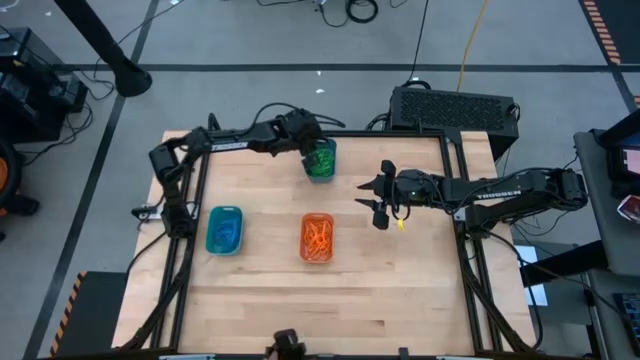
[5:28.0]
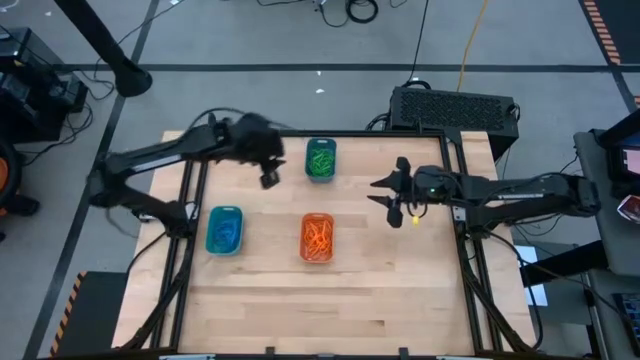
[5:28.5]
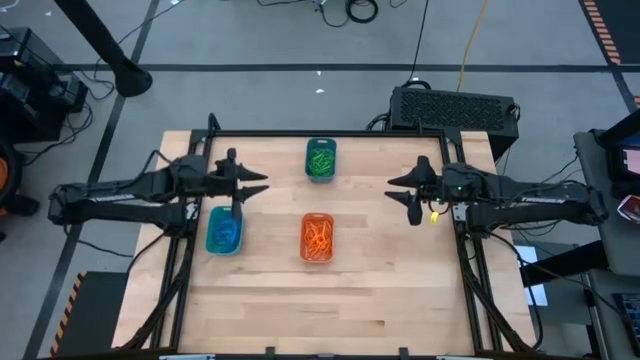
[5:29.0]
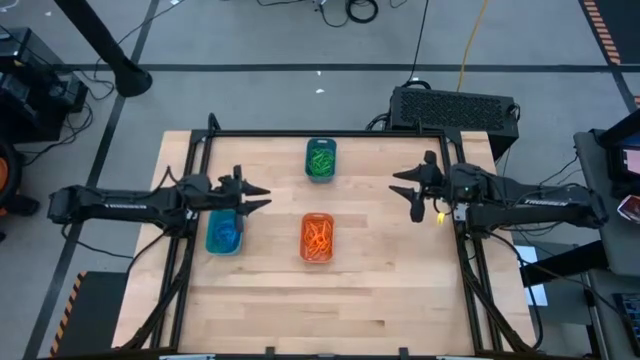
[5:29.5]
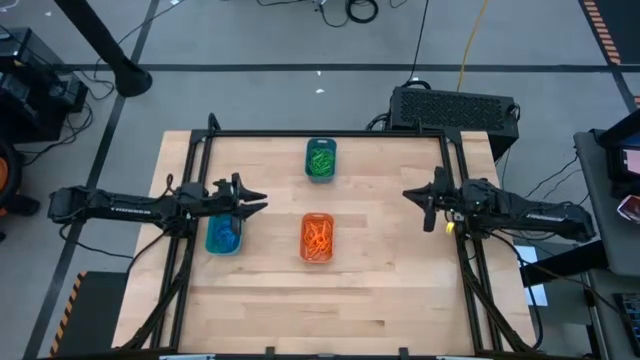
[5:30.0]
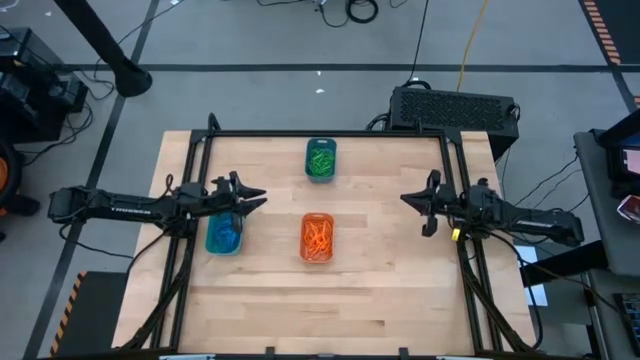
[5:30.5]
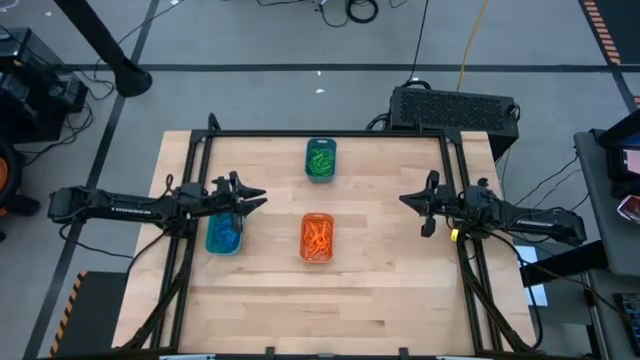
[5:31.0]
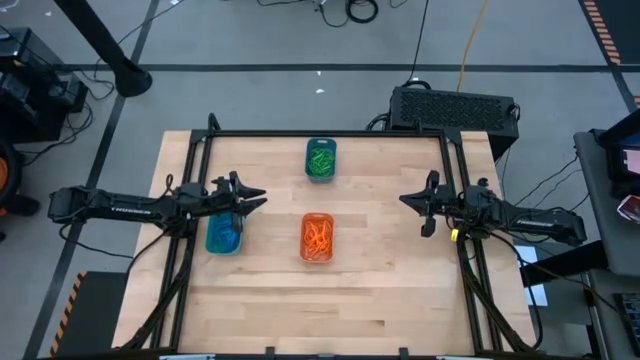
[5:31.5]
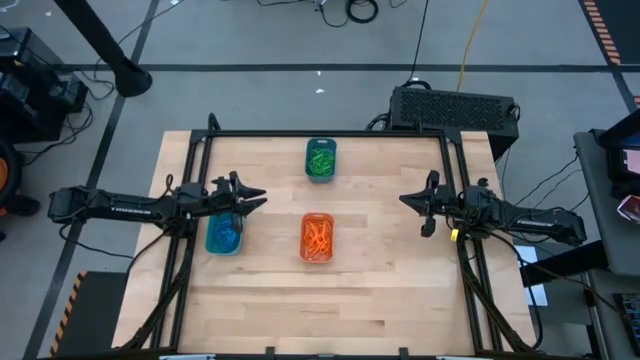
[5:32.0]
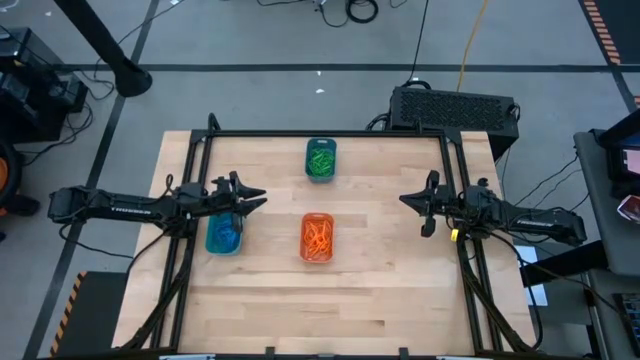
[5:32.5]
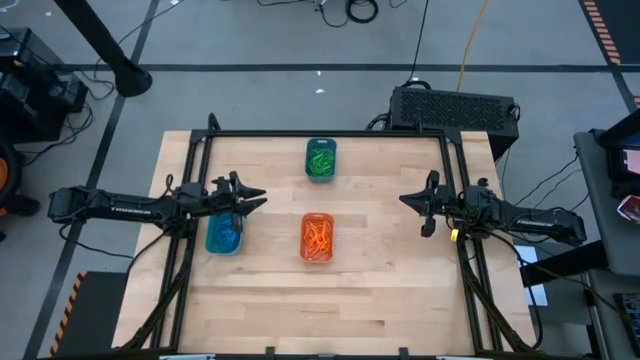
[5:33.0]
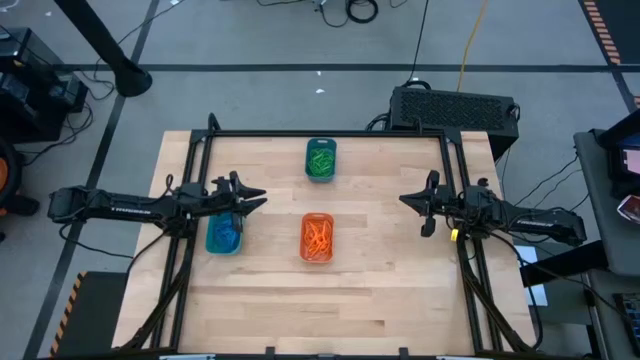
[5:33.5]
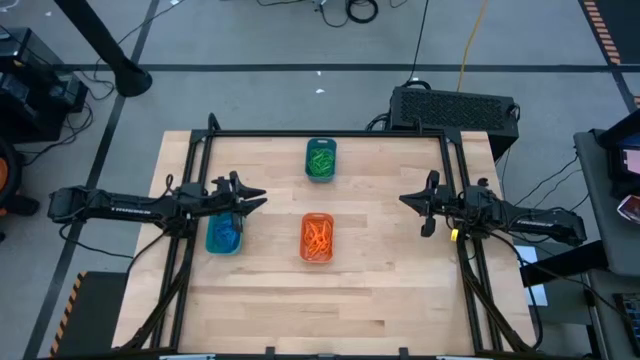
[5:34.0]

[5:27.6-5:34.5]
Task: Sort rubber bands into baskets
Return to Home Position

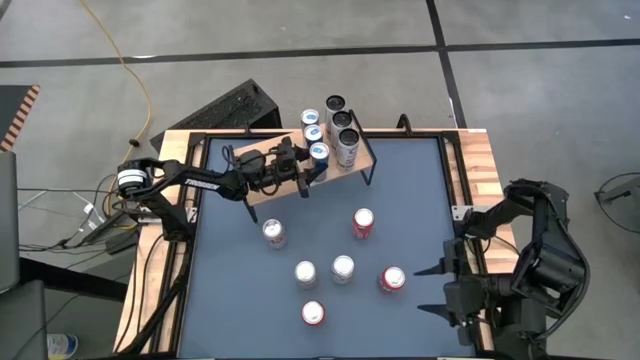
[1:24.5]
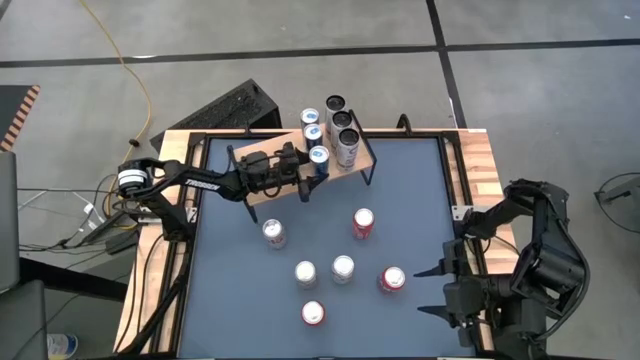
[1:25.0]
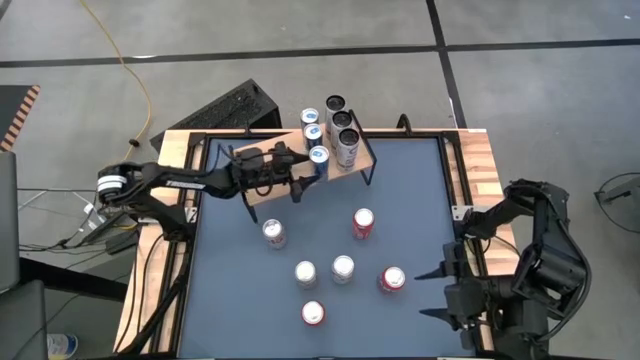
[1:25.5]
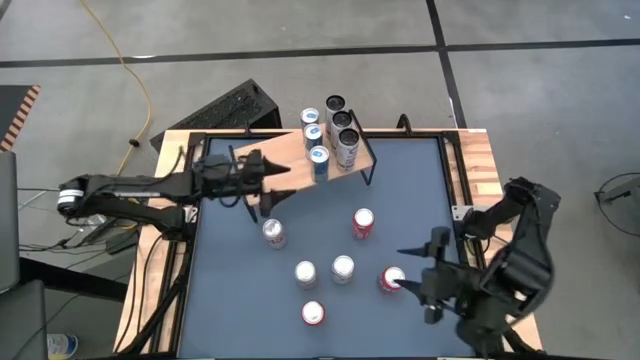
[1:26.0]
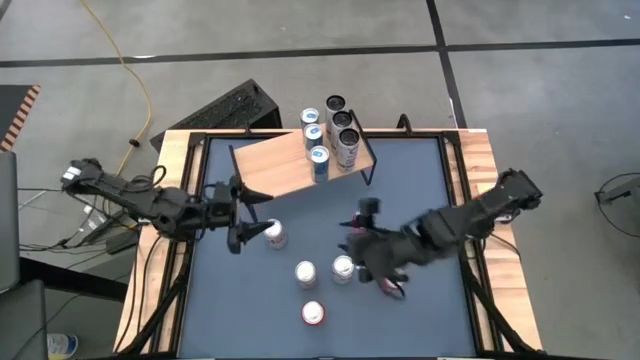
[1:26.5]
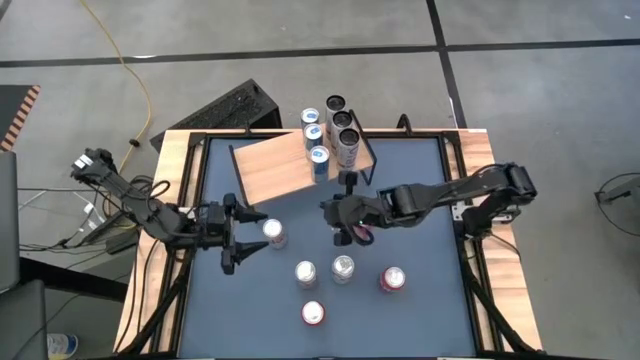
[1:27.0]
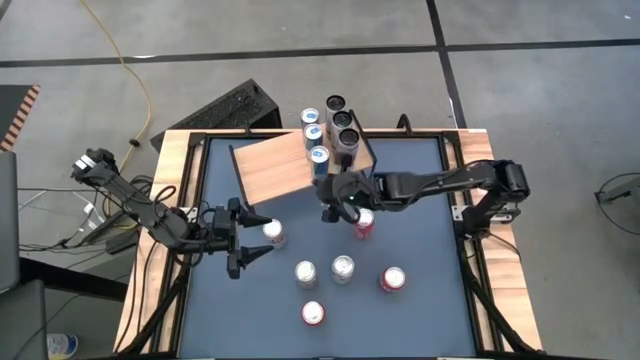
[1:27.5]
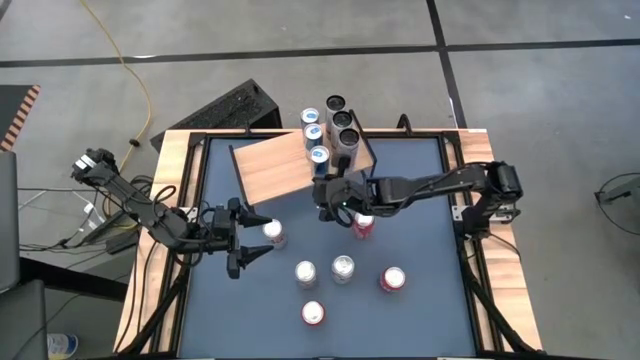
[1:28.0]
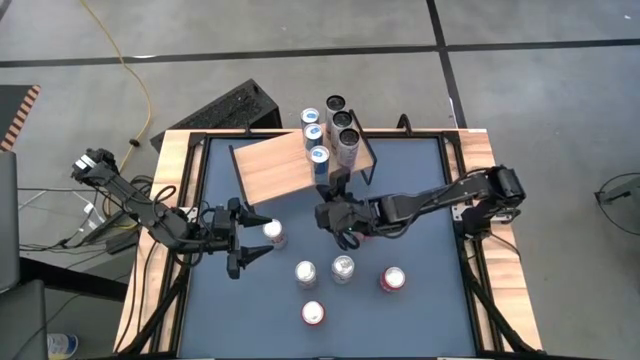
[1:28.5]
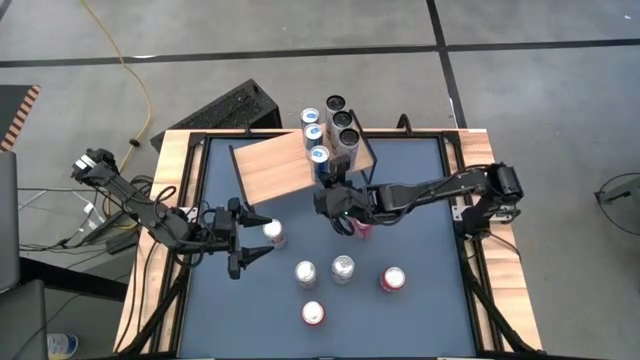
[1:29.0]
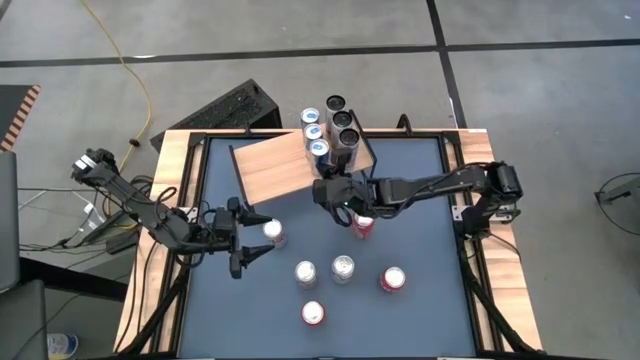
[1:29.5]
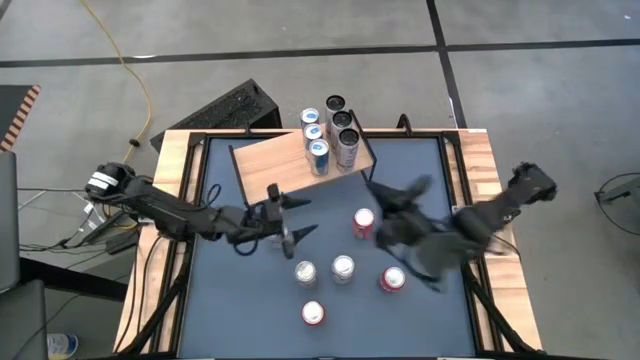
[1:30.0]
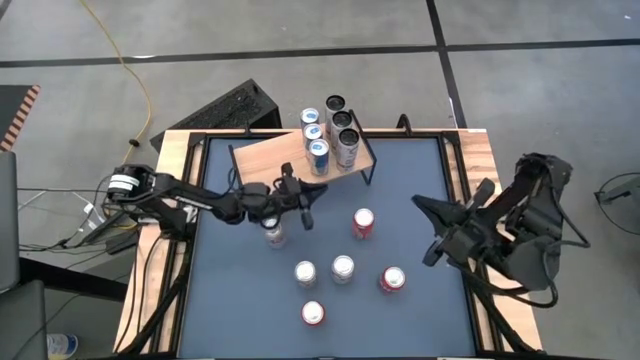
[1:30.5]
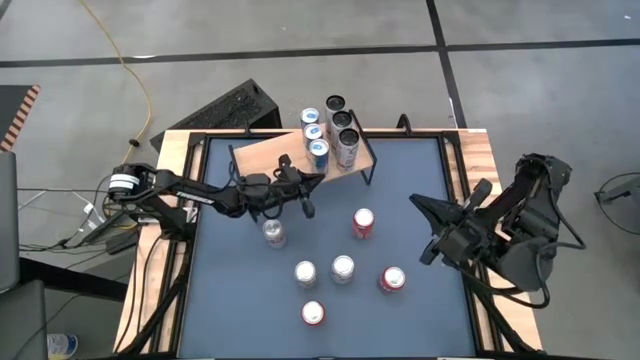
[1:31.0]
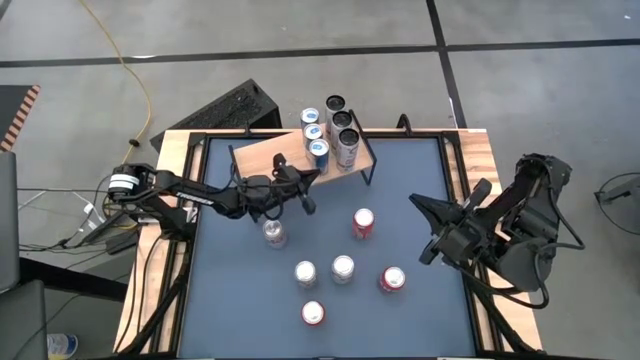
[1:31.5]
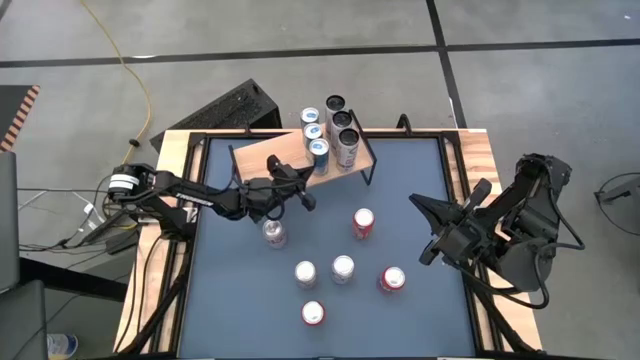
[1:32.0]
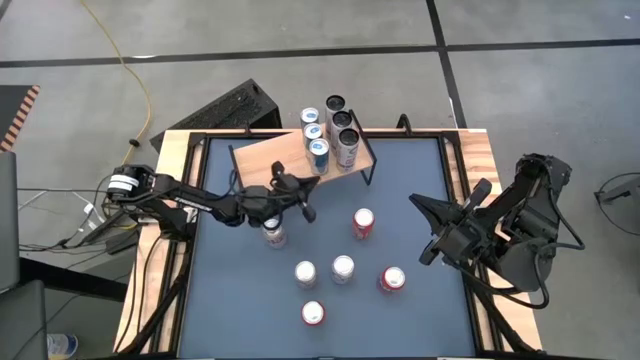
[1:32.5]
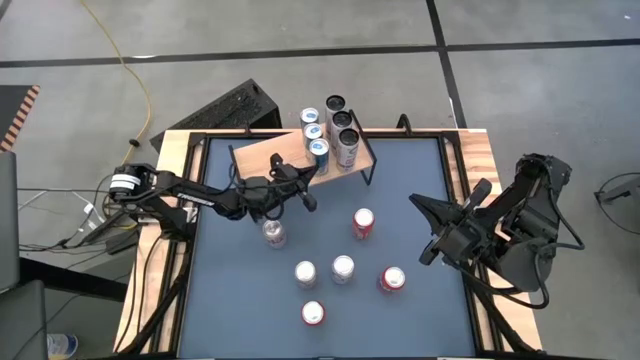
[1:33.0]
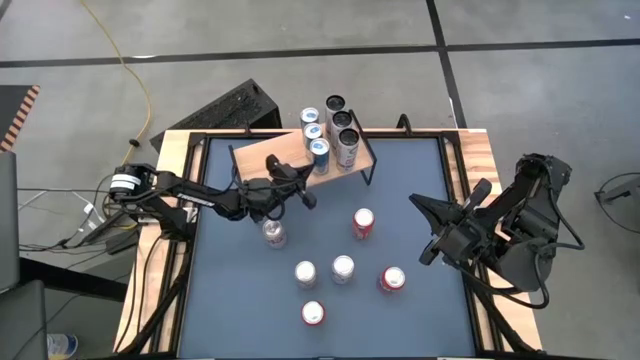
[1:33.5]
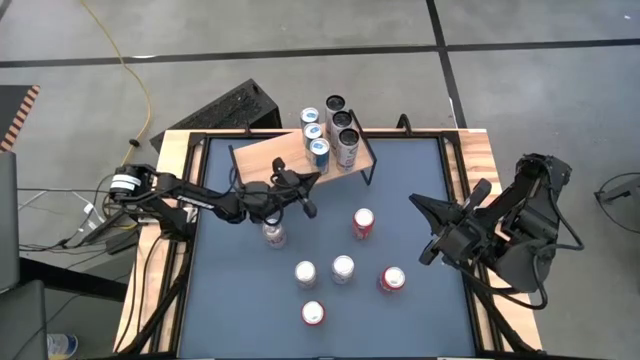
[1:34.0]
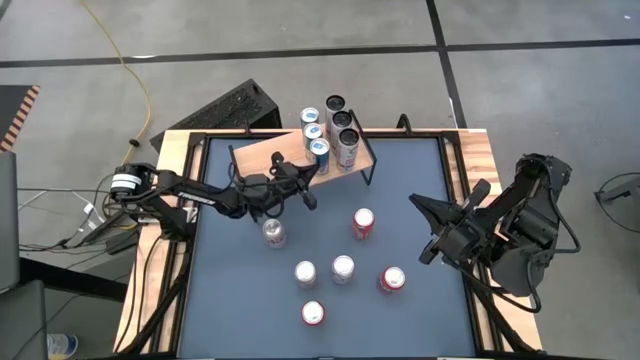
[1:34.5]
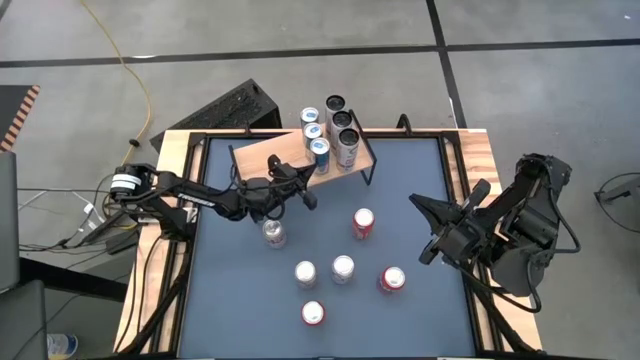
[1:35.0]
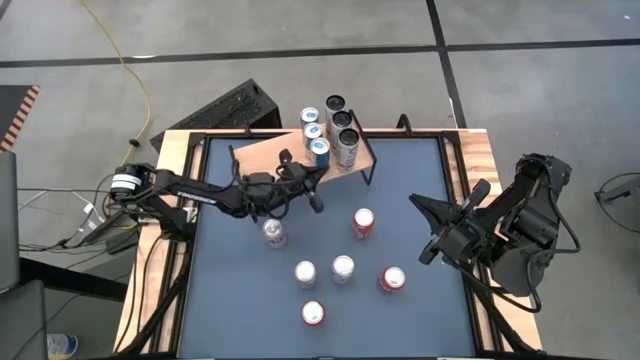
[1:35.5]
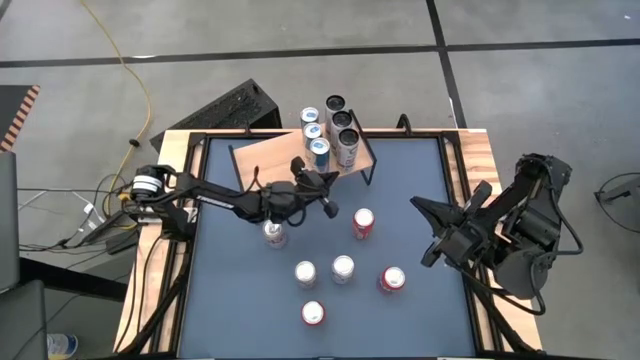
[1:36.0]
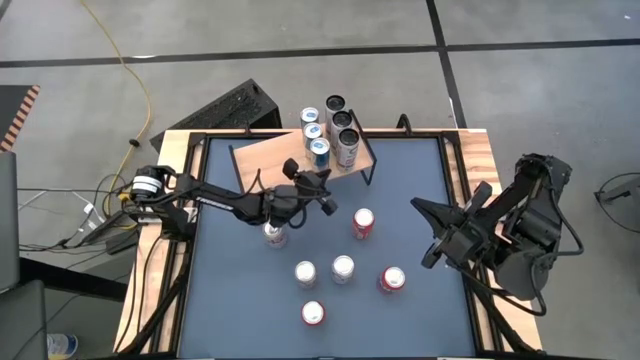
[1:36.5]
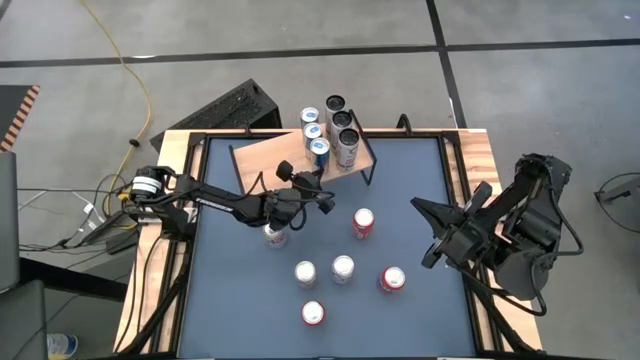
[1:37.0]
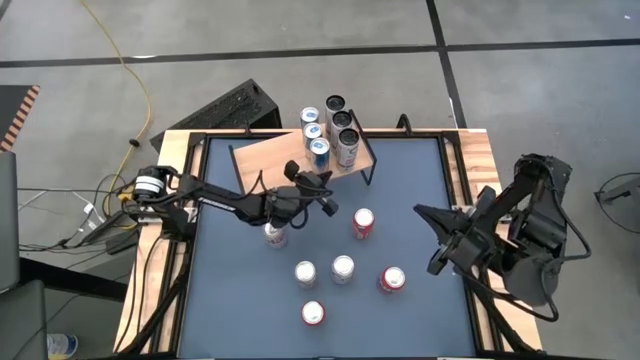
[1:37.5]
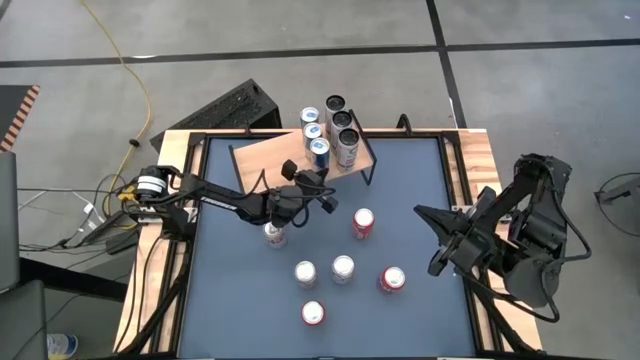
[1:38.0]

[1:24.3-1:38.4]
Task: Place canned beverage on shelf
Put the blue soda can on the shelf aligned with the other blue soda cans

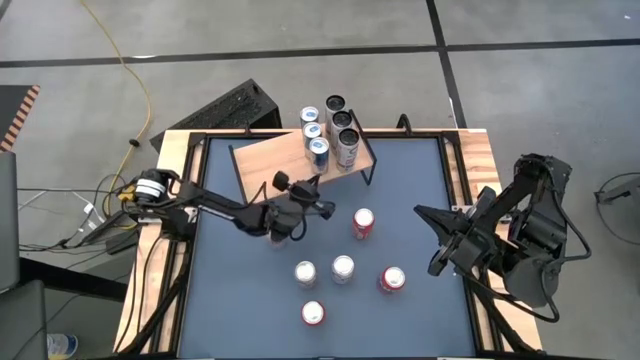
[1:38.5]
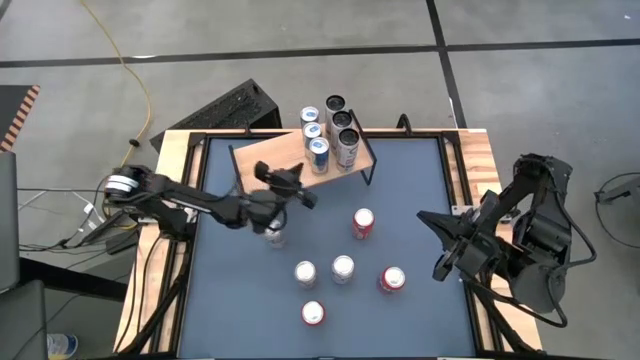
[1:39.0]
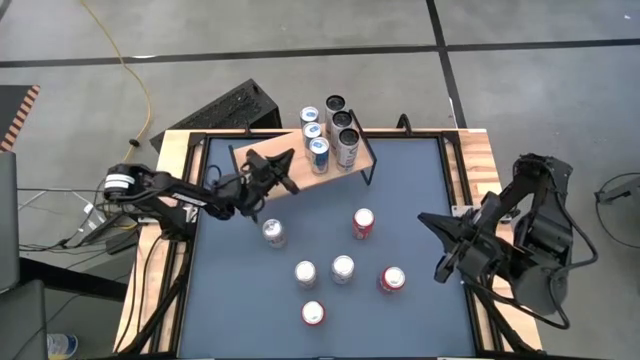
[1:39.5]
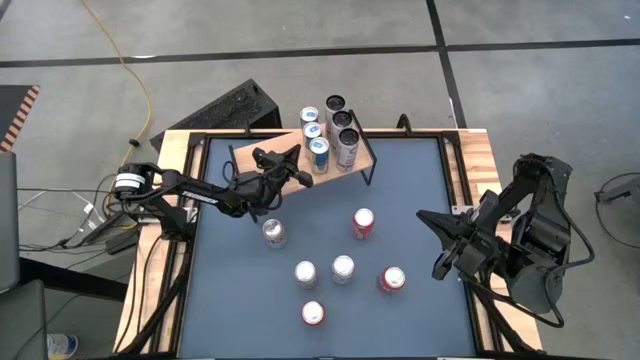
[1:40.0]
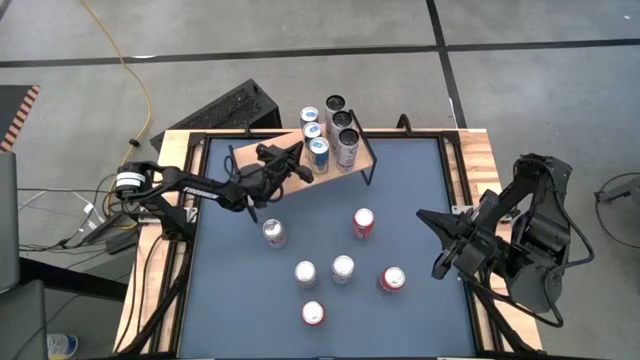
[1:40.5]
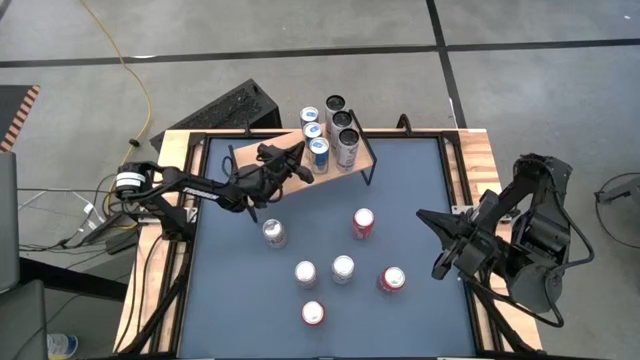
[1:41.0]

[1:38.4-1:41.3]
Adjust the blue soda can on the shelf
